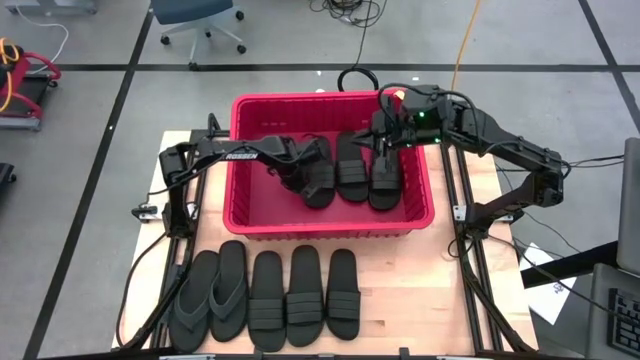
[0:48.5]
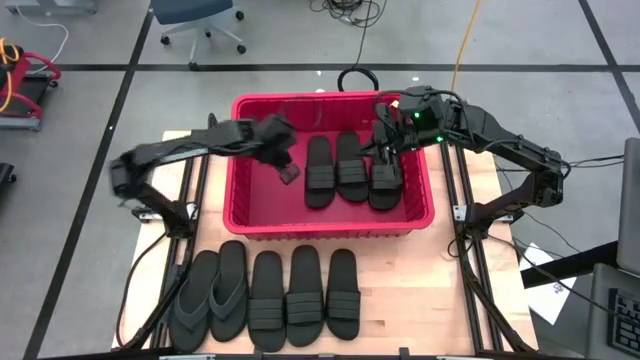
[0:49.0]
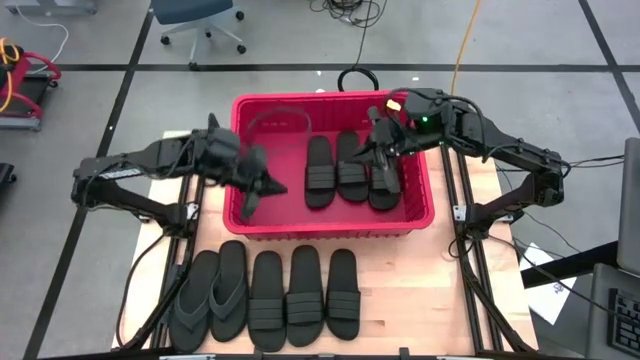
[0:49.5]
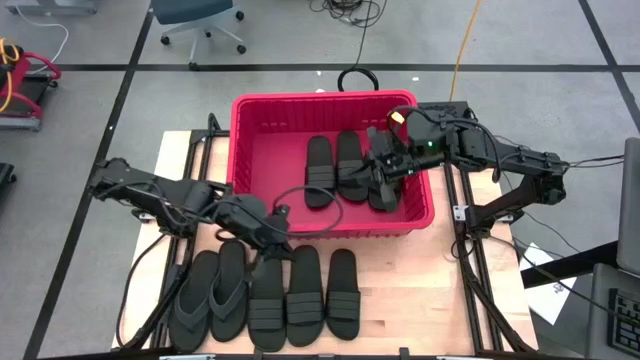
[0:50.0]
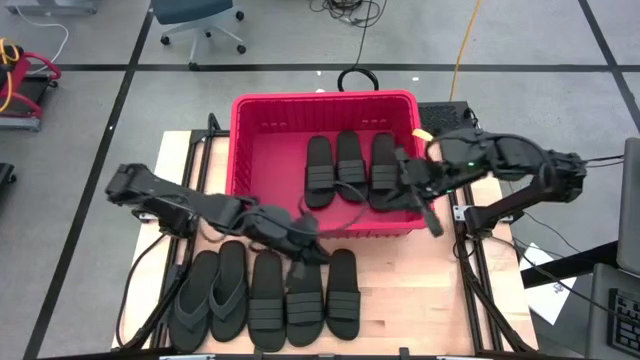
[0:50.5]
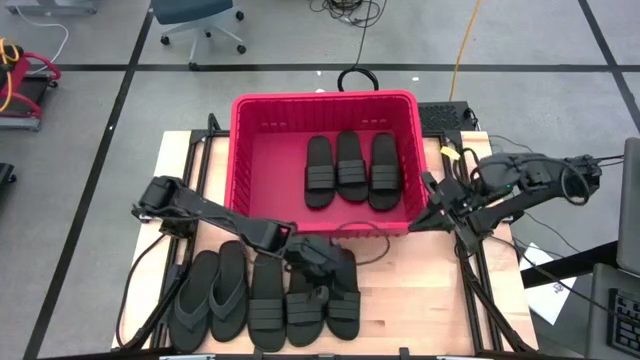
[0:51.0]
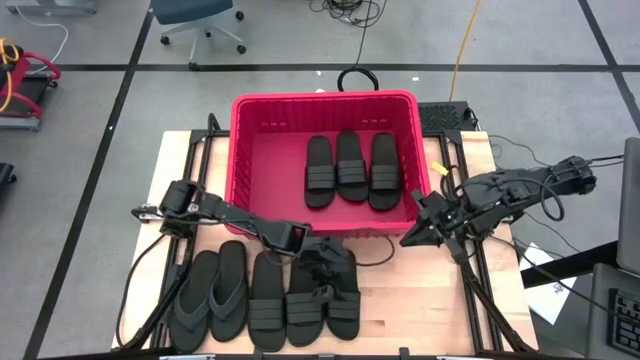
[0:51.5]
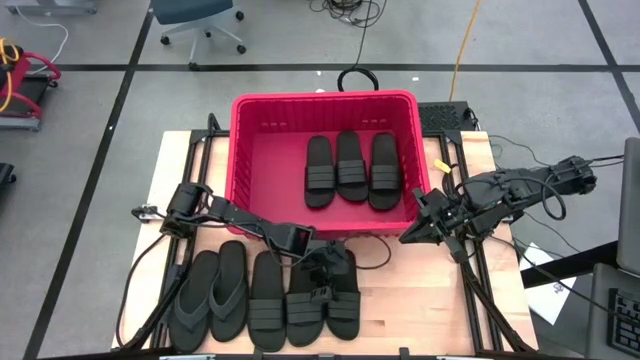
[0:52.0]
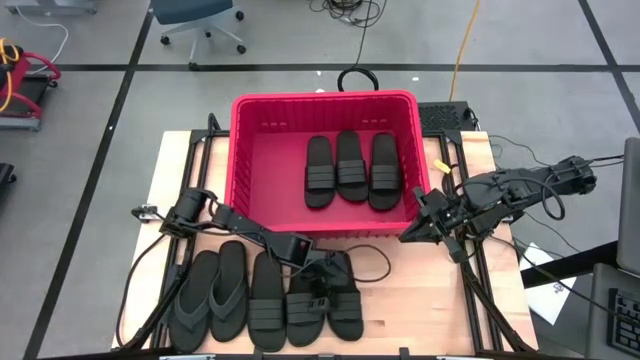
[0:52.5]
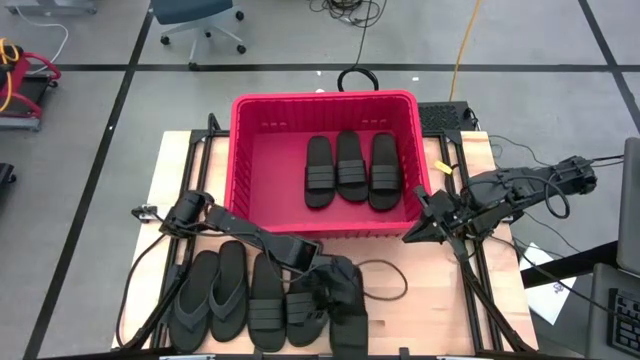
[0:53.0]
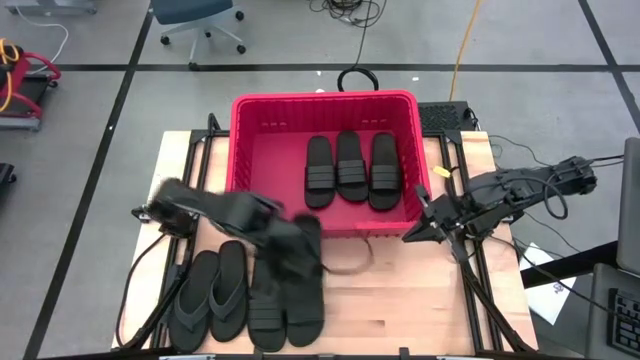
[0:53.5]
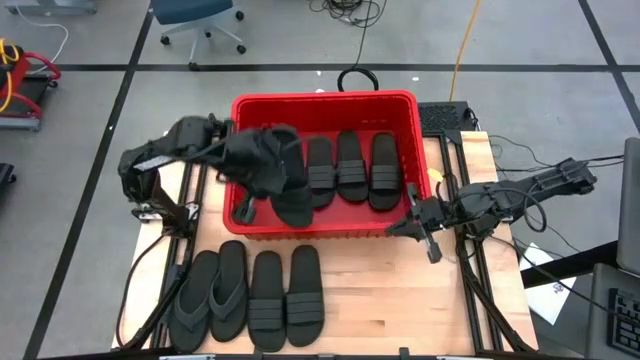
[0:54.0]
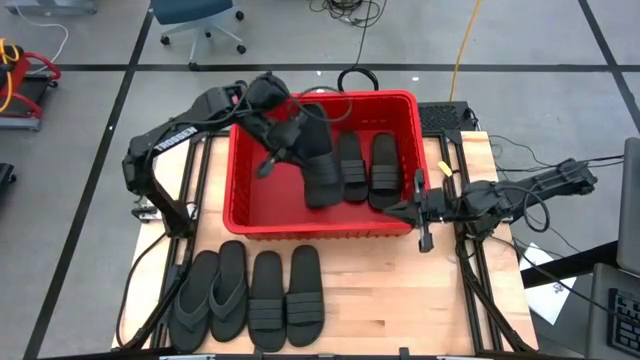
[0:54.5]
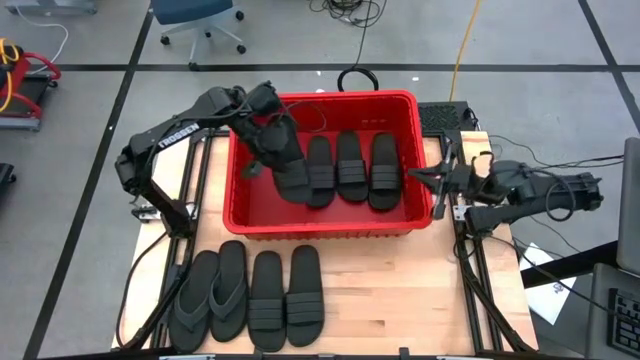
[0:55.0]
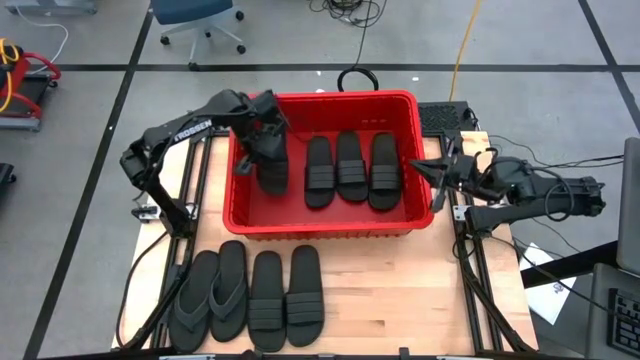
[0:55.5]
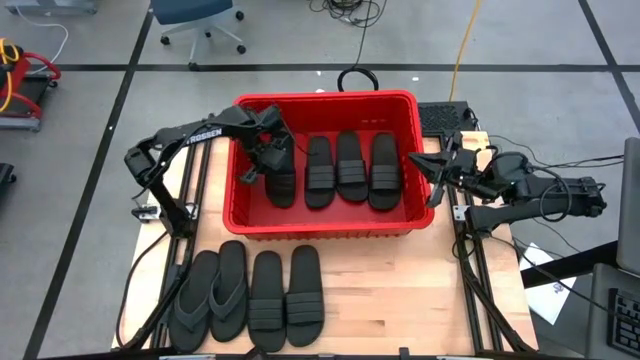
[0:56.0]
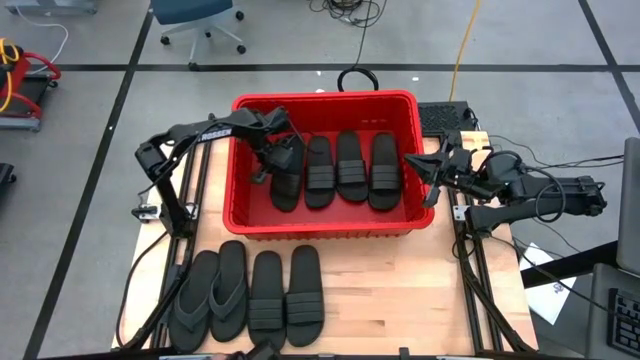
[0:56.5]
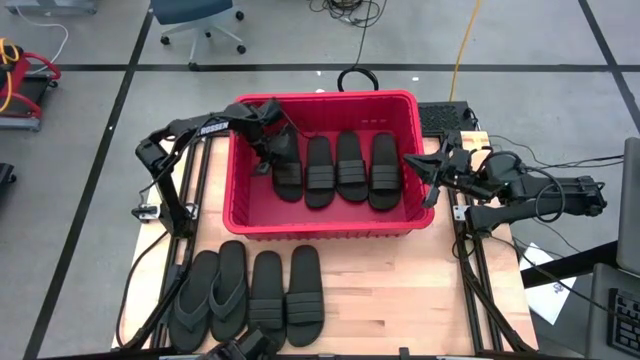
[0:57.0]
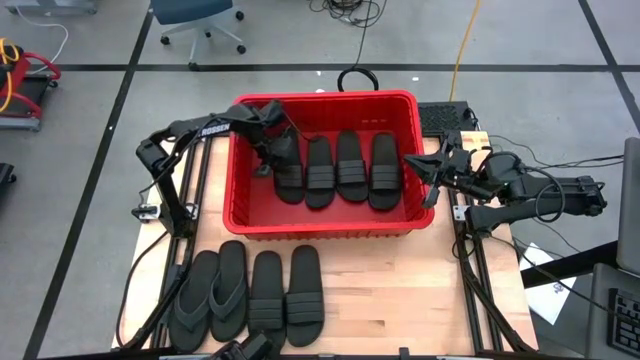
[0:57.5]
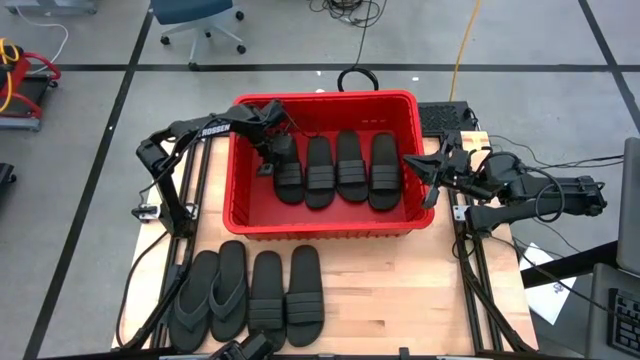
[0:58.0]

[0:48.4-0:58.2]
Task: Pick and place slides into bin
Put the black slide into the red bin

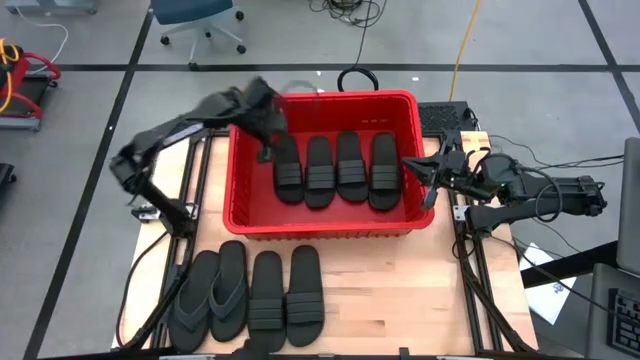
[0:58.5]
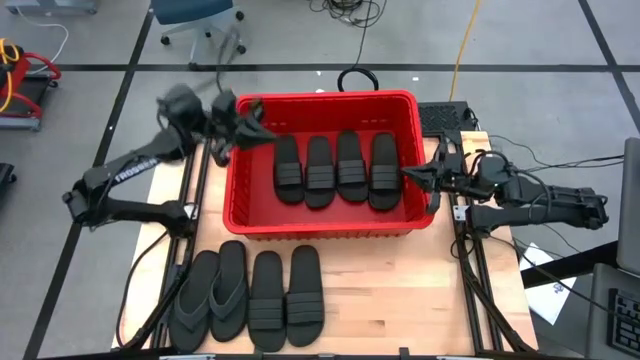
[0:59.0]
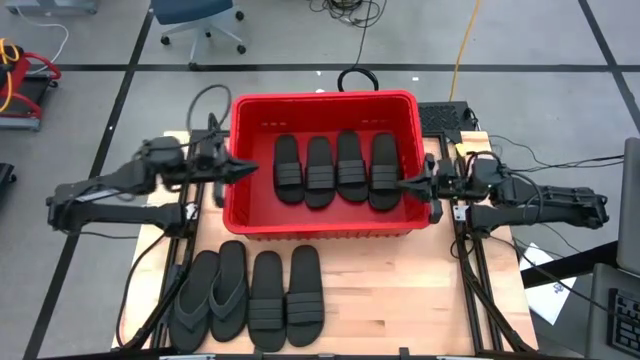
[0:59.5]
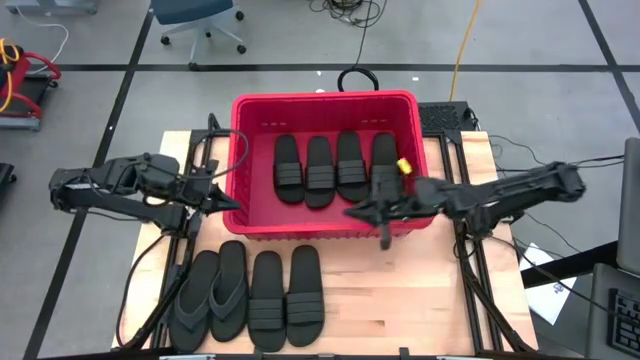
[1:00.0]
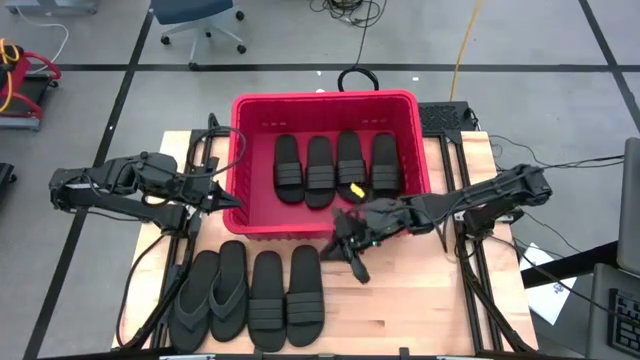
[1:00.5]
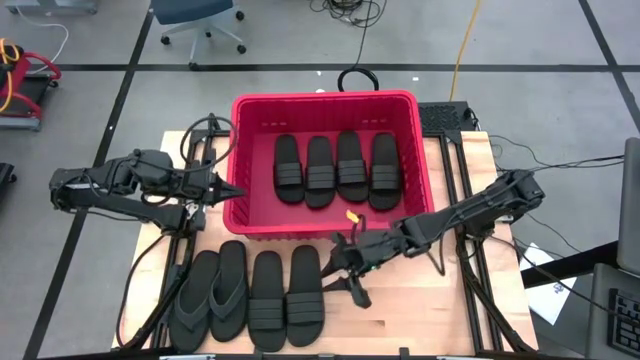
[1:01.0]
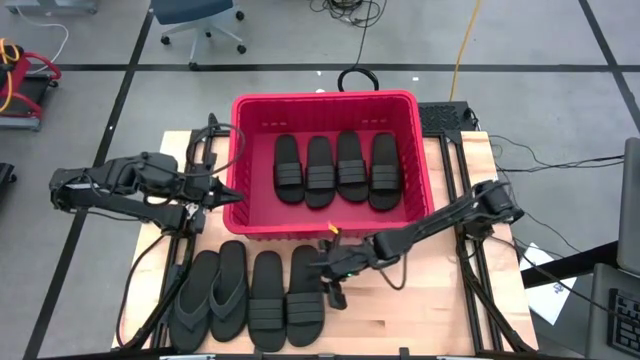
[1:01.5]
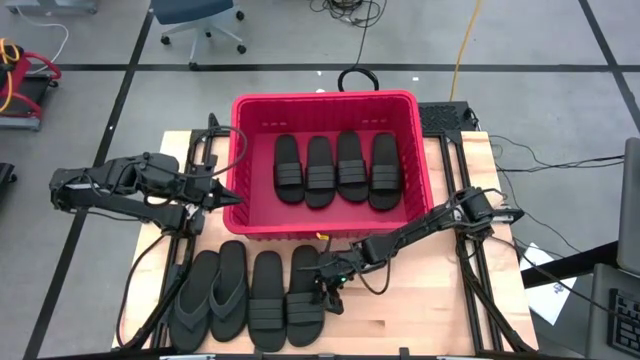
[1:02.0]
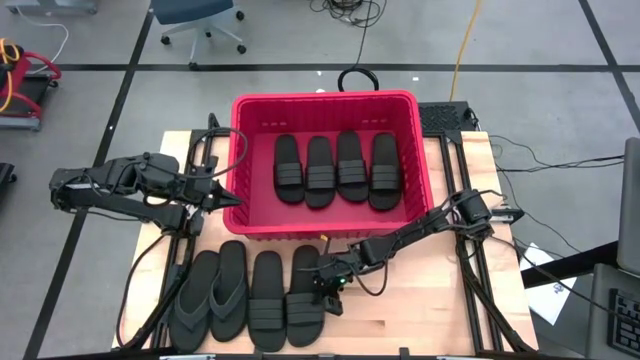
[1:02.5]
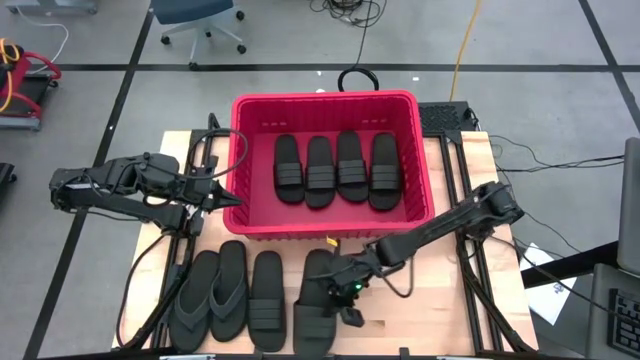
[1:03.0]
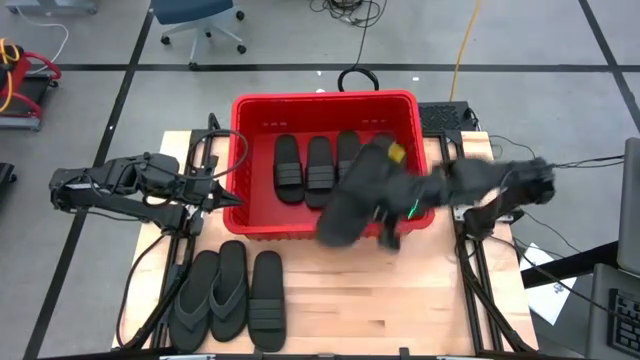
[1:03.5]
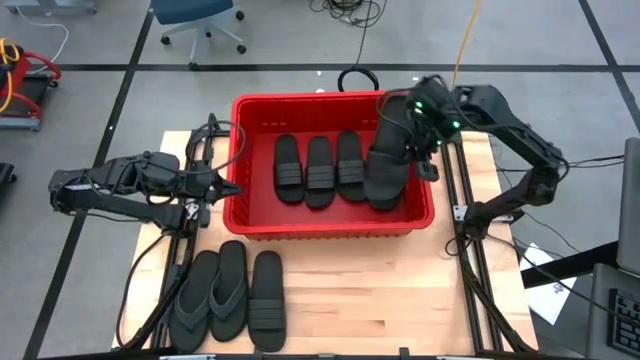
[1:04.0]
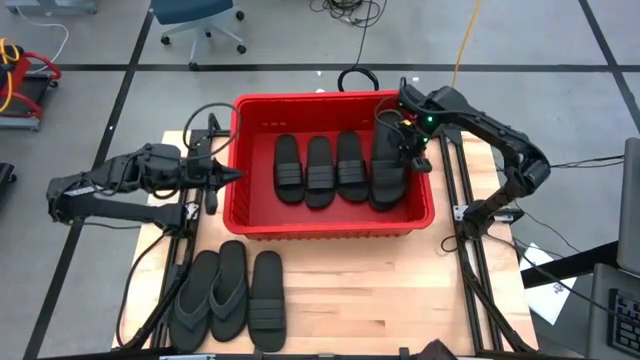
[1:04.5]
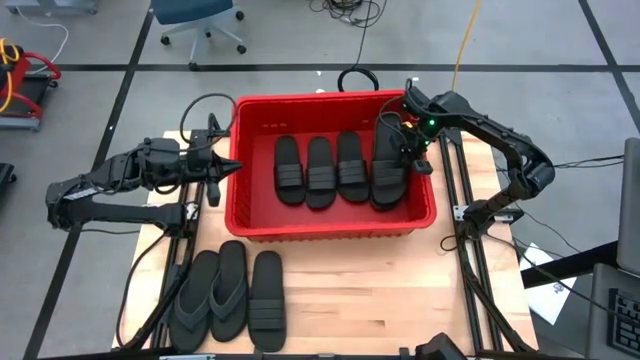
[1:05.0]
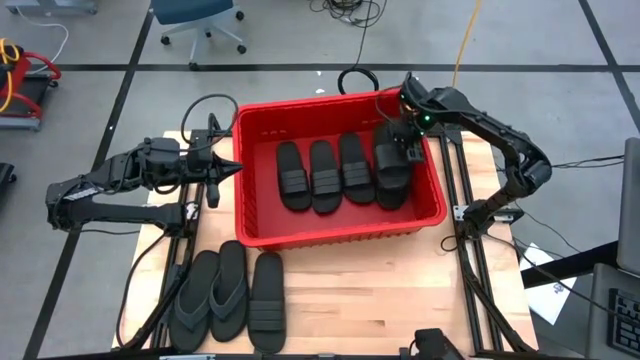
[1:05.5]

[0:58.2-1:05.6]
Put the black slide into the red bin

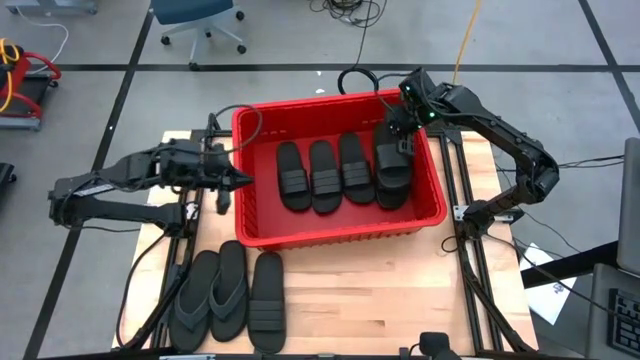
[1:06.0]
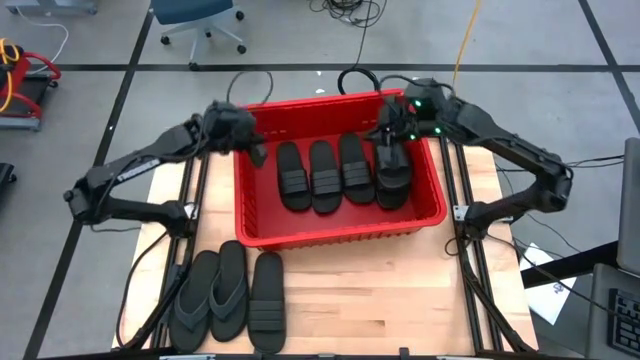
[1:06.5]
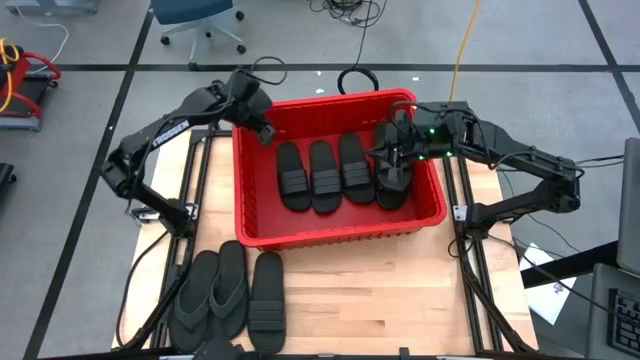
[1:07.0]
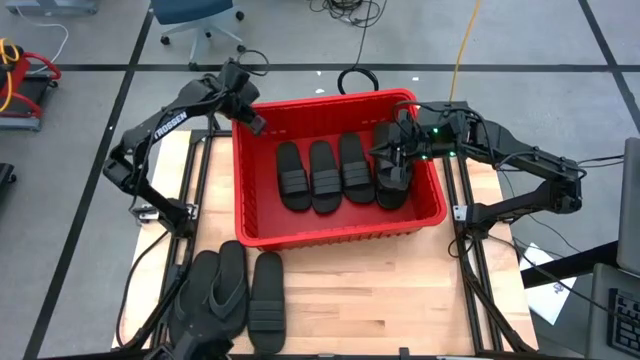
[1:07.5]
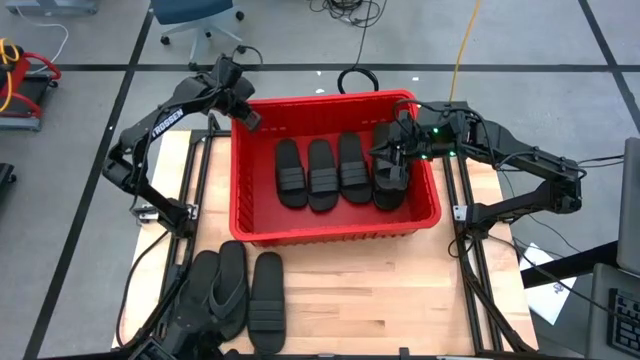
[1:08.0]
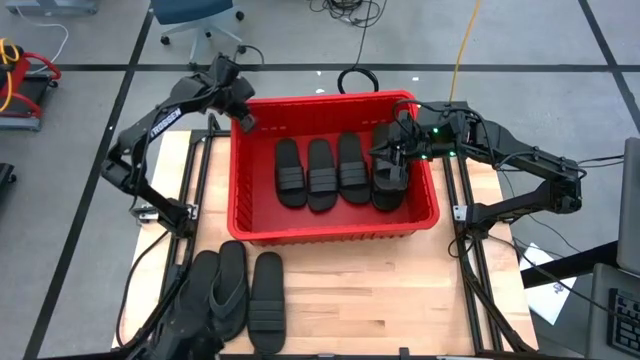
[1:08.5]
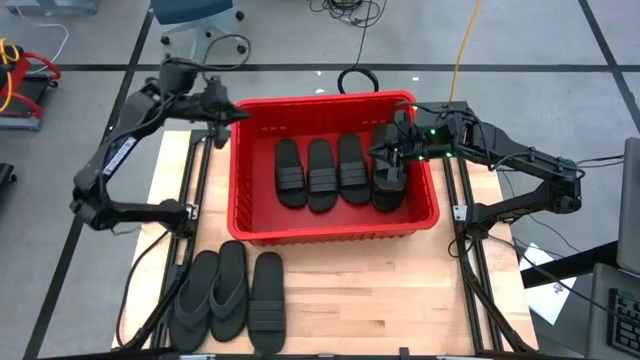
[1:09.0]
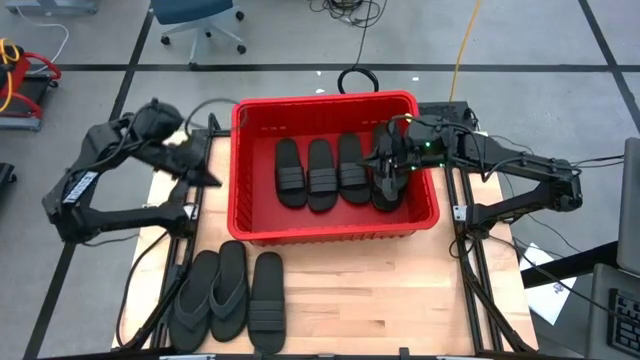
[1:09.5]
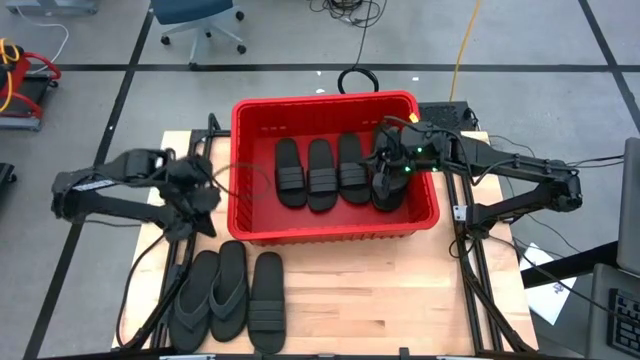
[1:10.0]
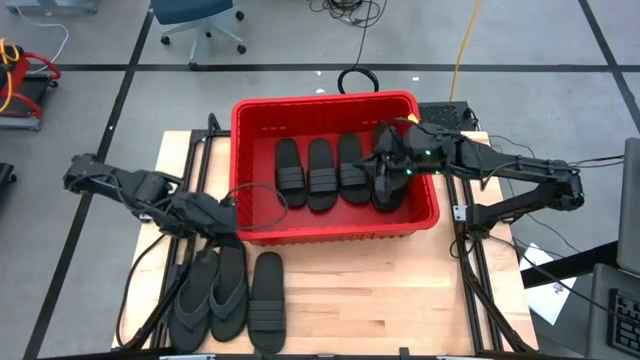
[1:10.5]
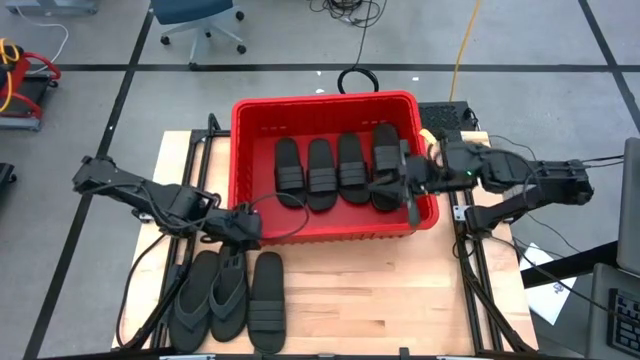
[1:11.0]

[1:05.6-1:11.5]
Adjust the red bin on the table
